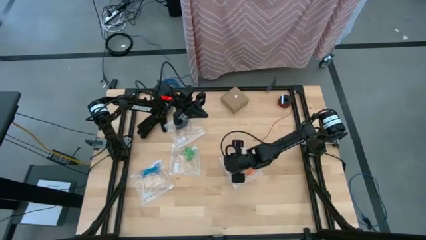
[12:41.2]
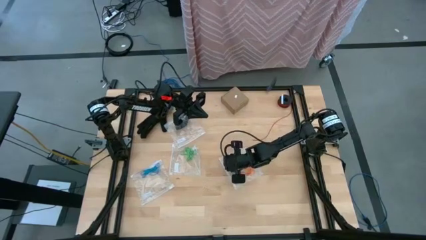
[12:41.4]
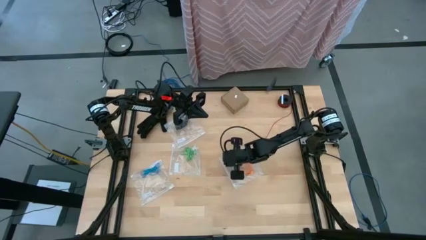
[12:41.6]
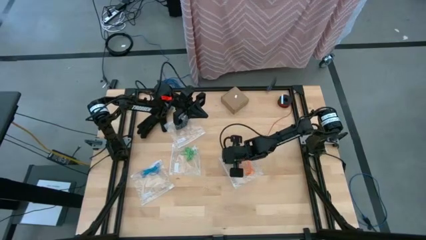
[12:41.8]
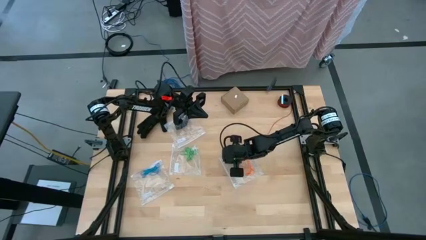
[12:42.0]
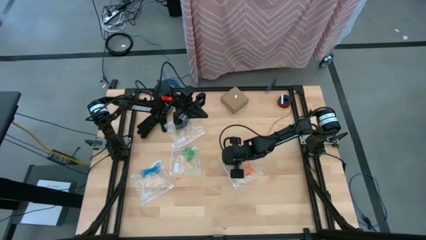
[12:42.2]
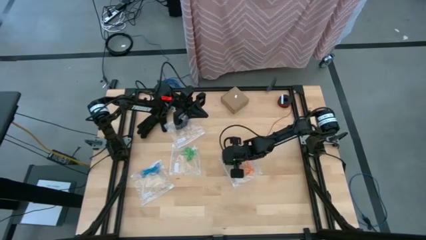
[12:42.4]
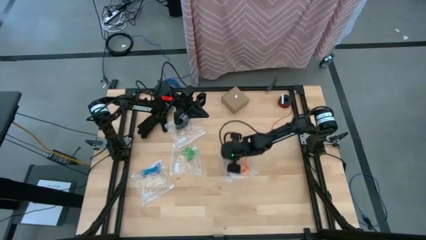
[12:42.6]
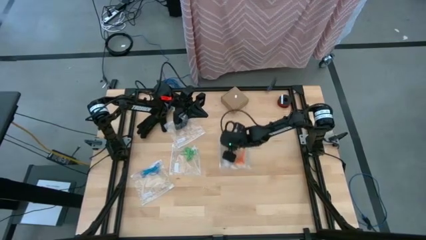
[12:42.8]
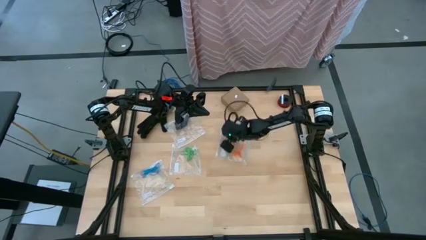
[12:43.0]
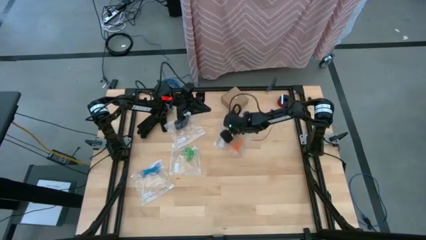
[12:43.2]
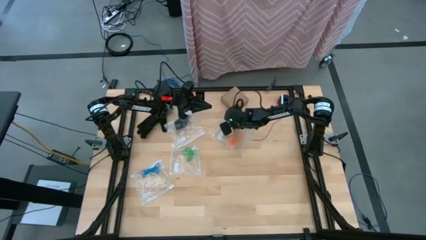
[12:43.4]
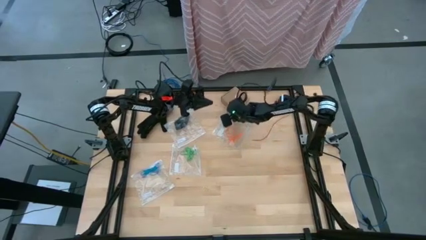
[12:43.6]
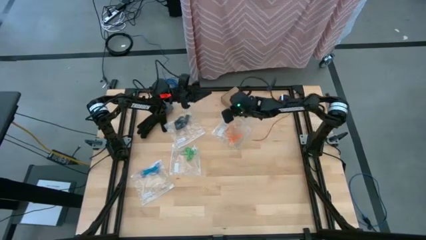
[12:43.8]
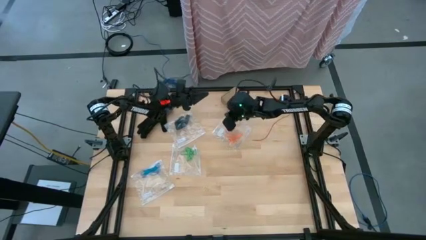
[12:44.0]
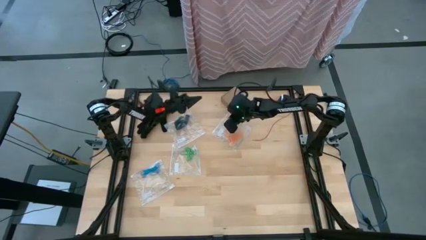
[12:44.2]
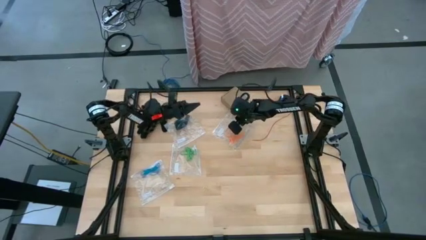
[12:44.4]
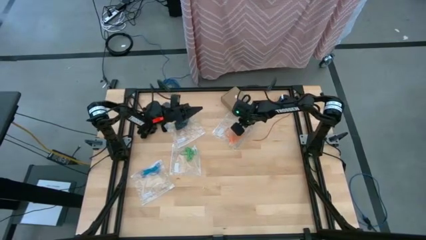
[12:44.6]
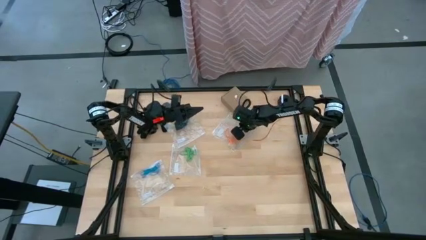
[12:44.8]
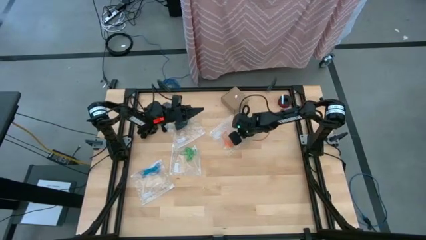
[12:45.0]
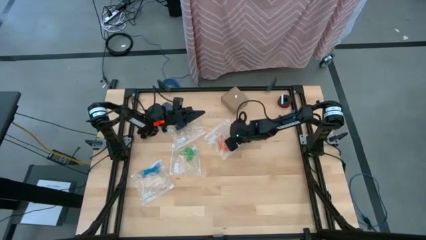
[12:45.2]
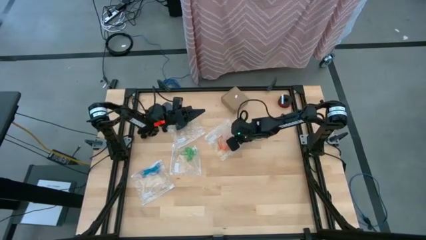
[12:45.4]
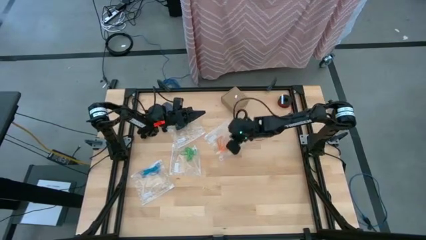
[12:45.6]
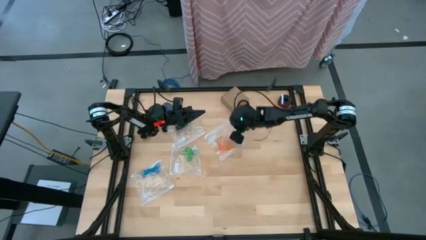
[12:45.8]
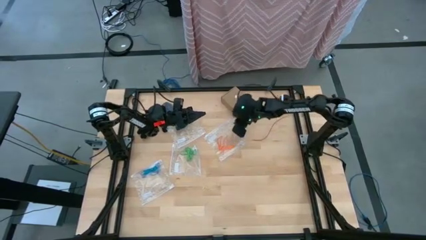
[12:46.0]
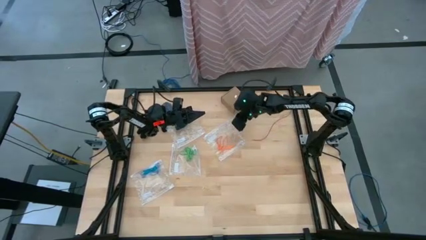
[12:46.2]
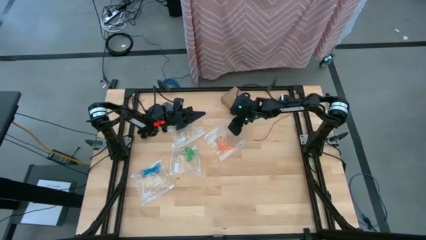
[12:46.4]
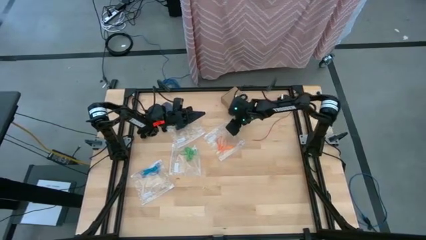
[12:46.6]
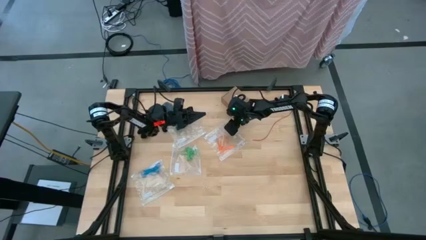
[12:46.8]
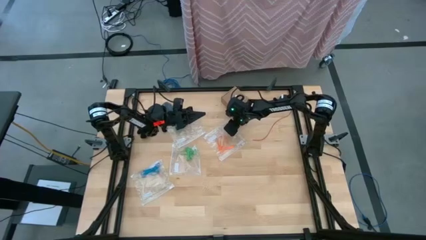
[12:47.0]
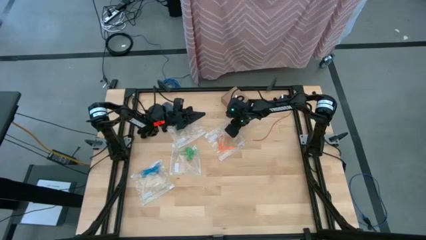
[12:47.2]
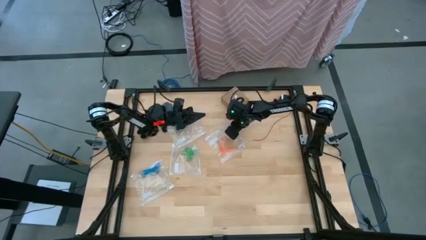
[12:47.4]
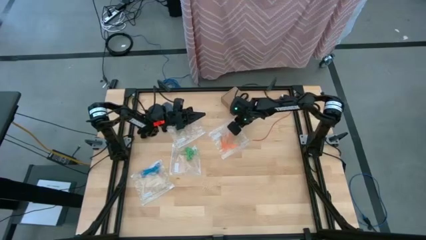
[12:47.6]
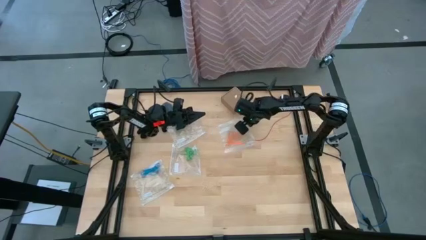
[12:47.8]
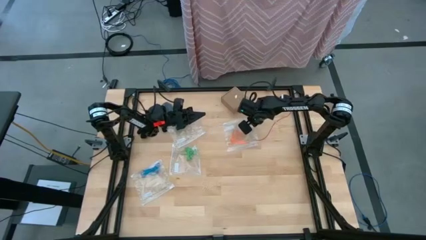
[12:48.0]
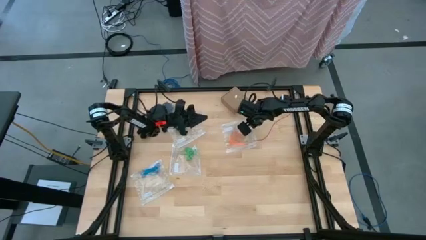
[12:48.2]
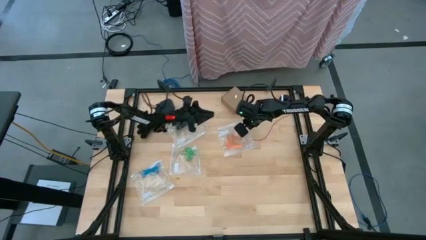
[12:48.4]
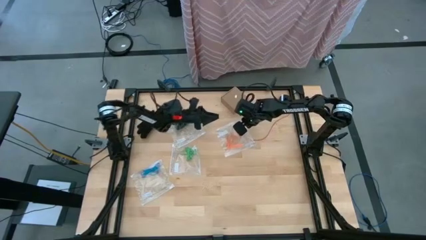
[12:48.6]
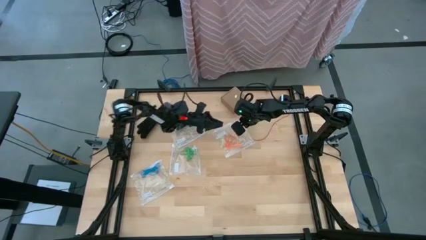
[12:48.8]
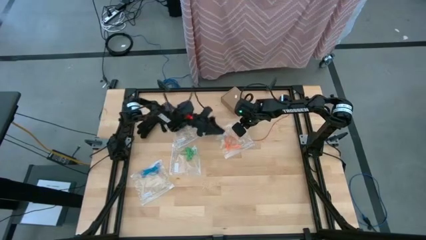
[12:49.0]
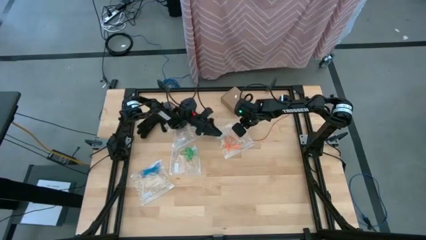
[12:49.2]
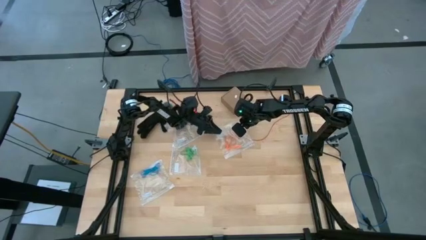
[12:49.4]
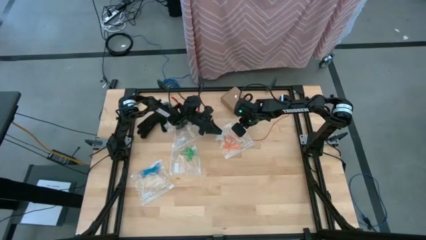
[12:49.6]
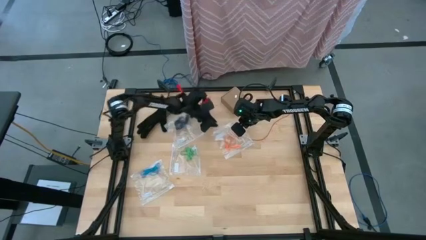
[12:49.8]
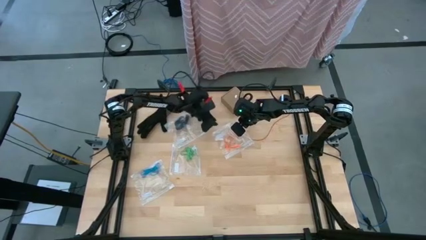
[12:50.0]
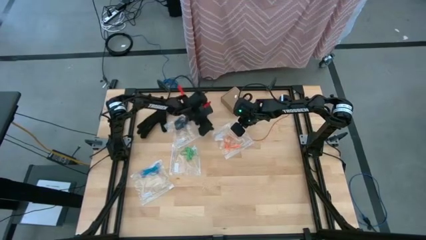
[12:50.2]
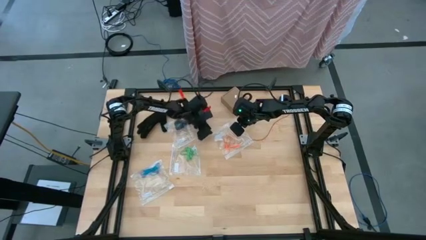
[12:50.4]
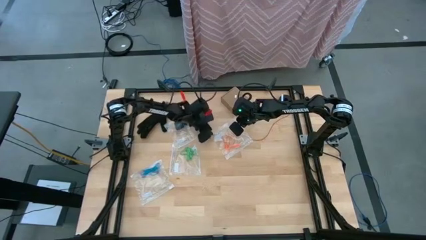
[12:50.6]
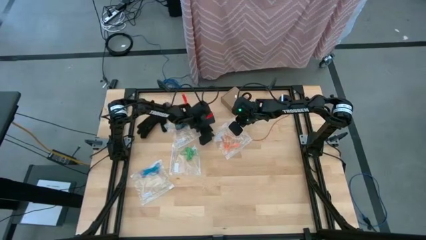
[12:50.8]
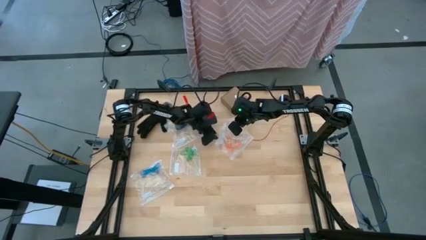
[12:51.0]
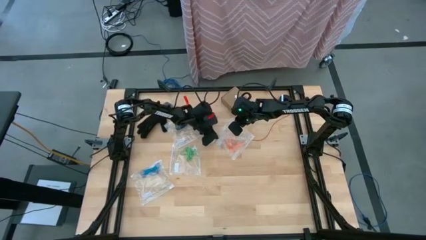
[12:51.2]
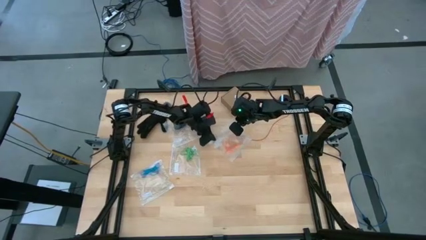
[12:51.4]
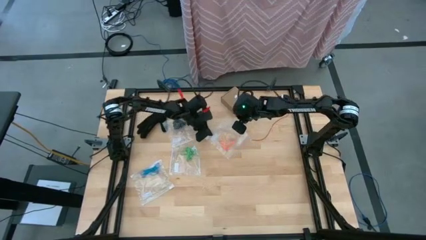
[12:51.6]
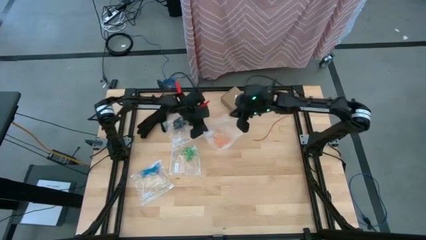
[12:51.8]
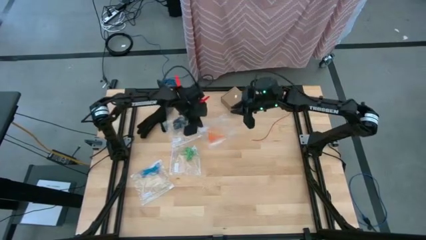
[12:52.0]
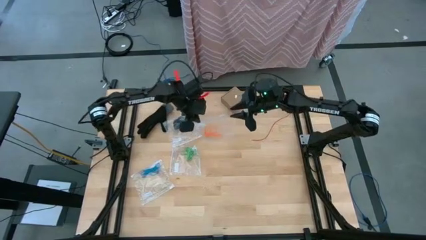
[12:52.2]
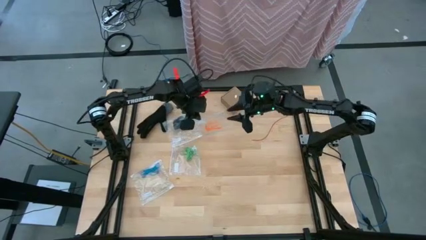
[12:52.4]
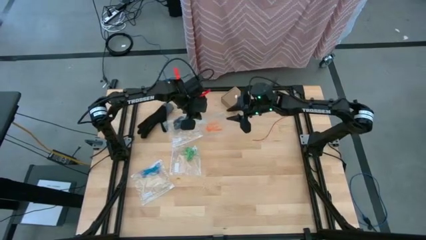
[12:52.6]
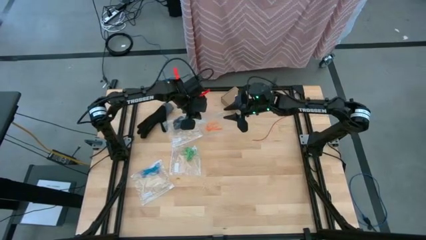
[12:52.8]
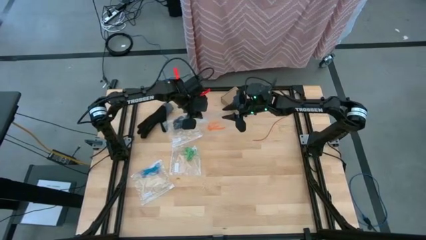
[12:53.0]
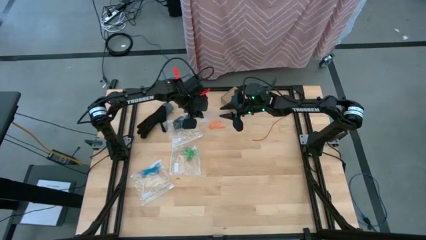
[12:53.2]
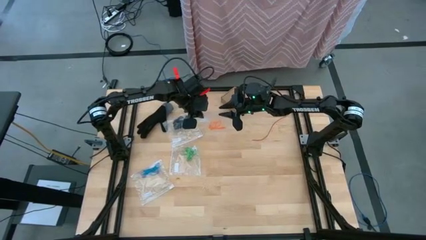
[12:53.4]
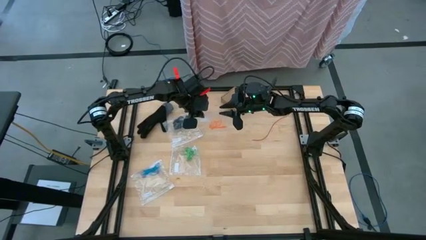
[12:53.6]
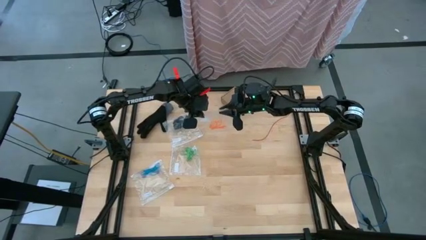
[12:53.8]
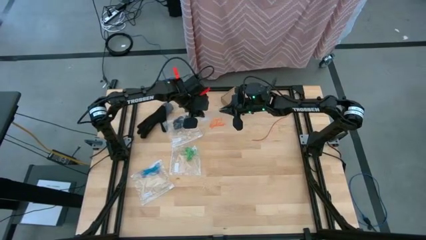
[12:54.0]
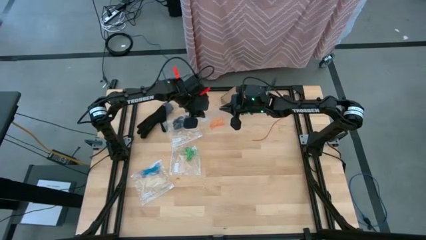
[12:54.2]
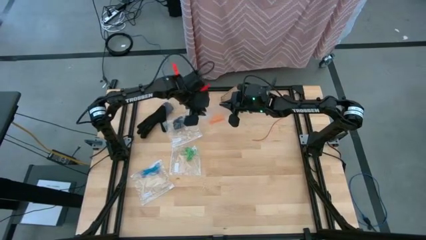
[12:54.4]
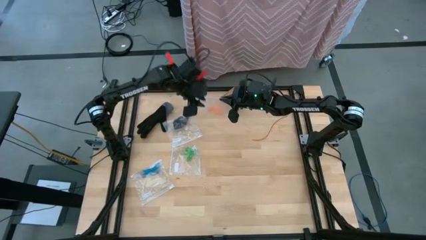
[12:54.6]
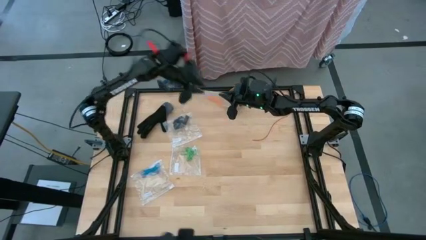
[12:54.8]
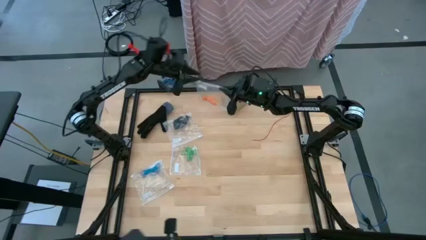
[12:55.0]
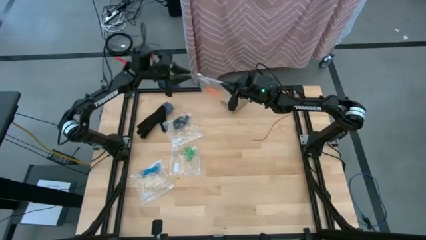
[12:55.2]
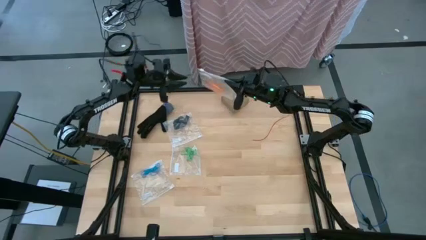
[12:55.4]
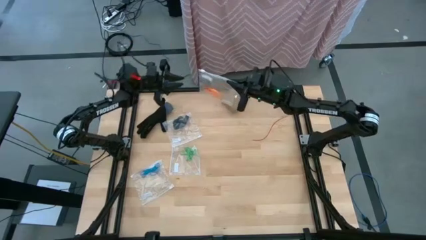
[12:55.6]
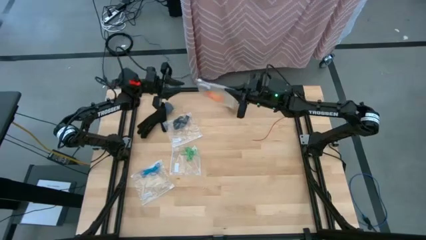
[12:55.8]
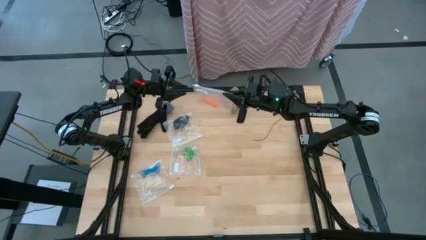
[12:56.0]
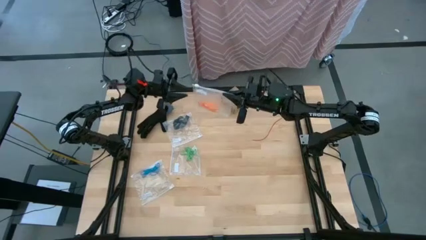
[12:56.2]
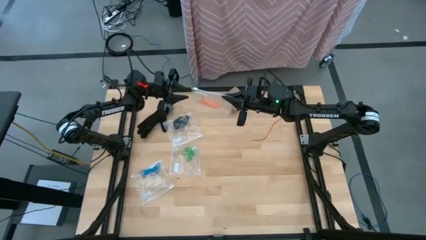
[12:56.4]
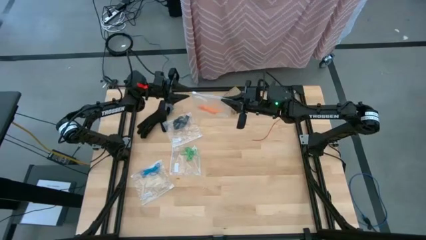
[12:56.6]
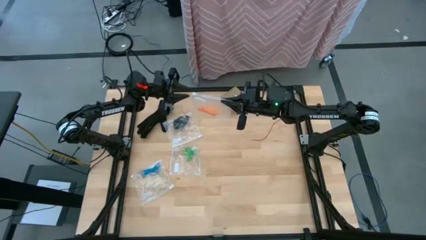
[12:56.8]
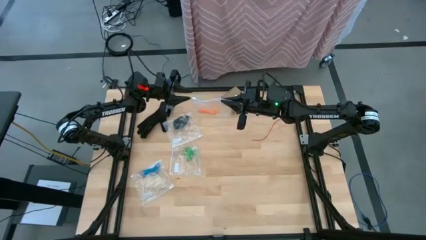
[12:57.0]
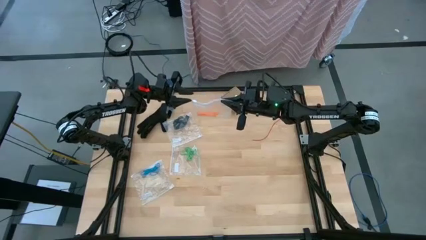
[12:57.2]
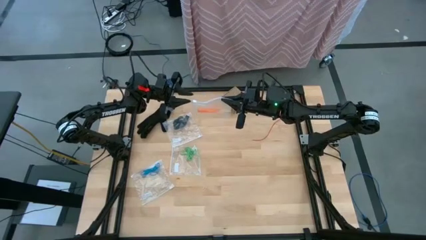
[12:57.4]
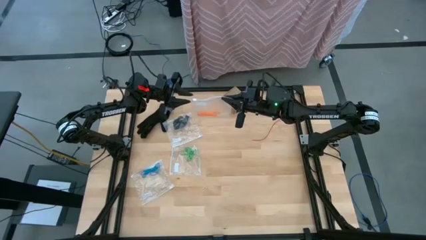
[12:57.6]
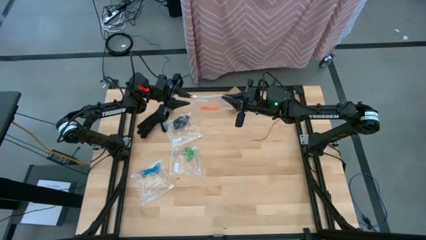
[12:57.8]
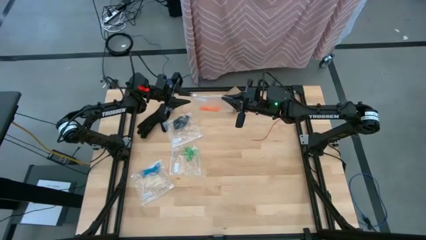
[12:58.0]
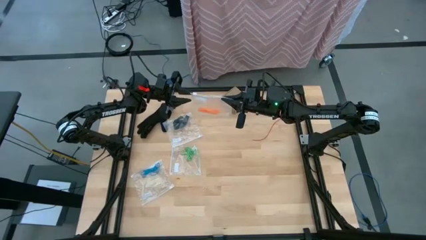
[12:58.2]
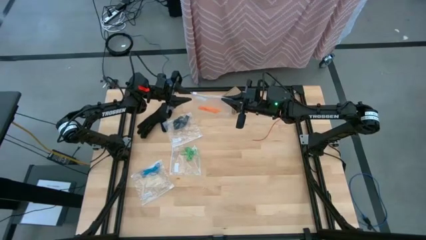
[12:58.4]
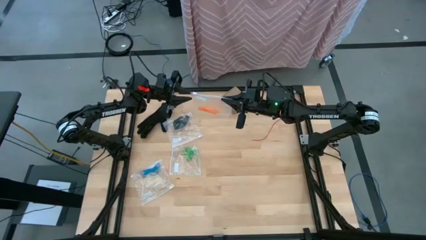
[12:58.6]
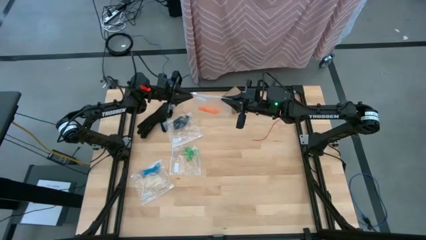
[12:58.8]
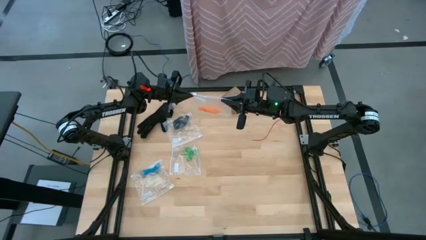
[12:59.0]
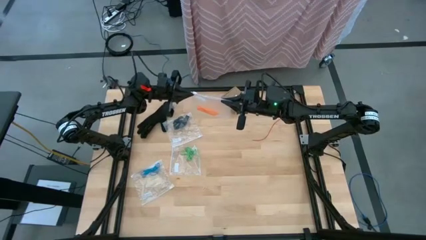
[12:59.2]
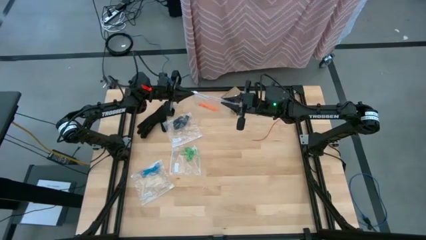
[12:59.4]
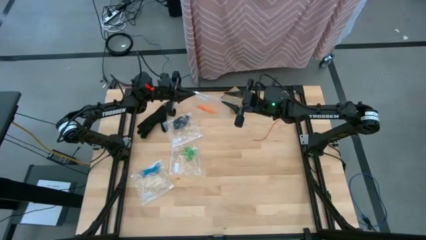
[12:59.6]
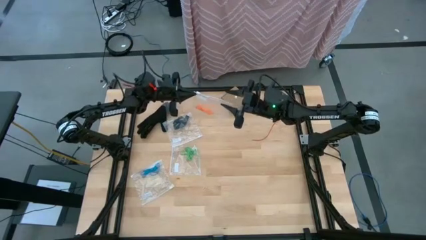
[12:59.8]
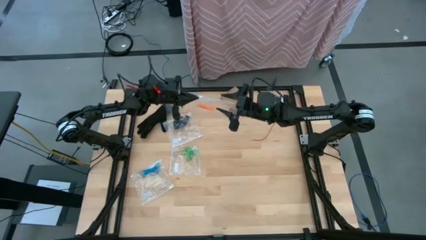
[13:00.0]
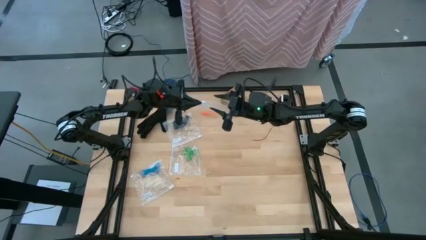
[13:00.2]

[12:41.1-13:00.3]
Task: Sort rubber bands
Close the transparent zip bag
